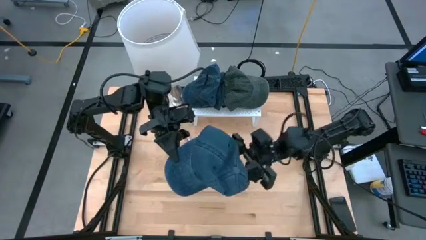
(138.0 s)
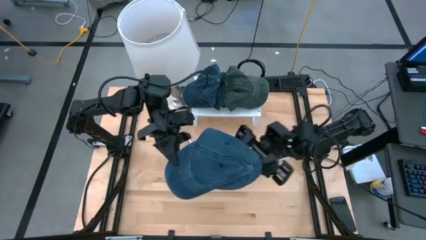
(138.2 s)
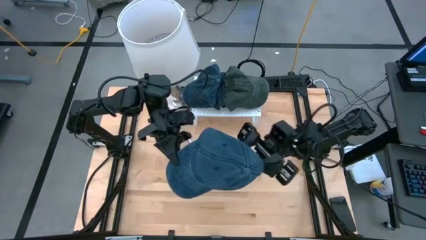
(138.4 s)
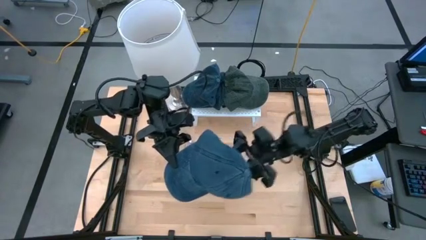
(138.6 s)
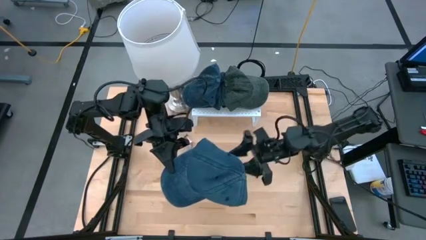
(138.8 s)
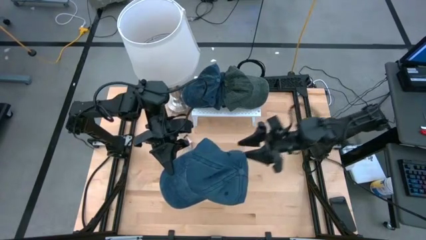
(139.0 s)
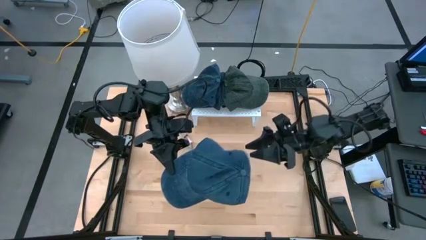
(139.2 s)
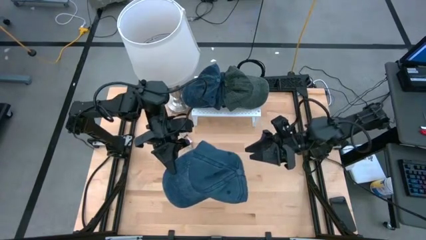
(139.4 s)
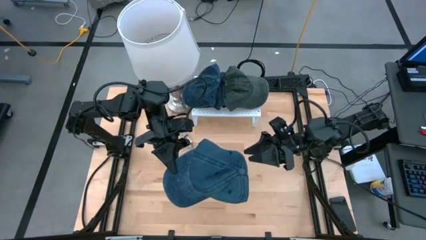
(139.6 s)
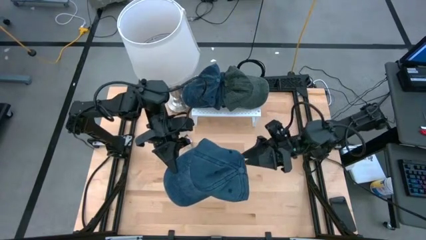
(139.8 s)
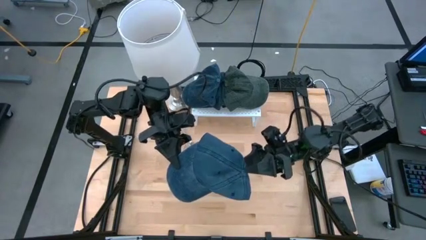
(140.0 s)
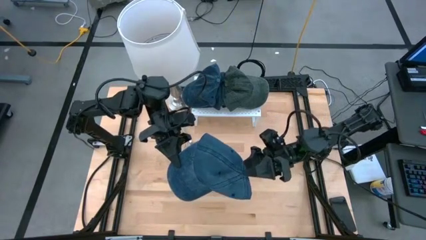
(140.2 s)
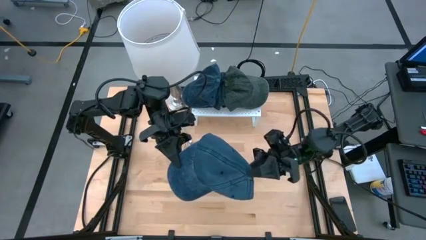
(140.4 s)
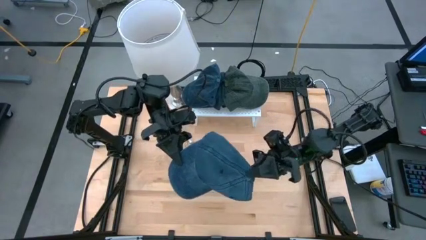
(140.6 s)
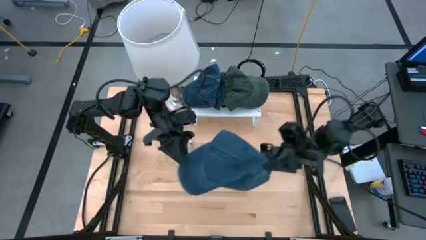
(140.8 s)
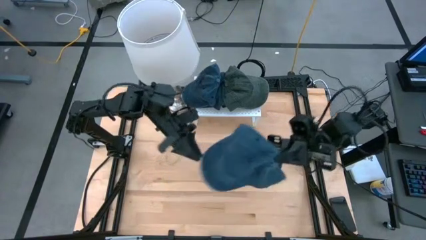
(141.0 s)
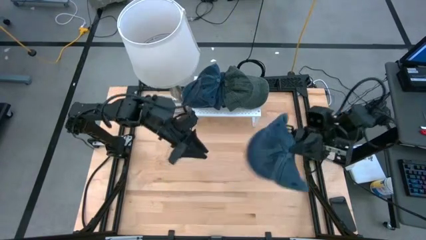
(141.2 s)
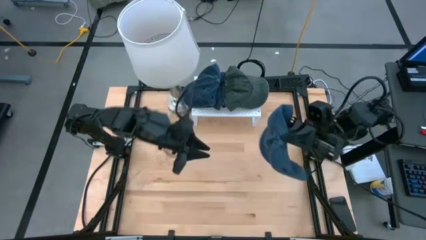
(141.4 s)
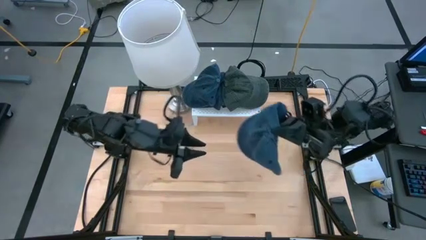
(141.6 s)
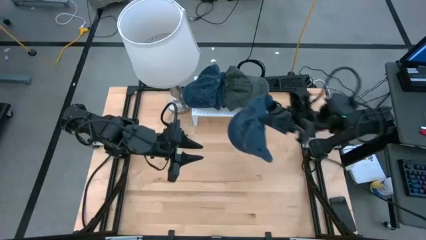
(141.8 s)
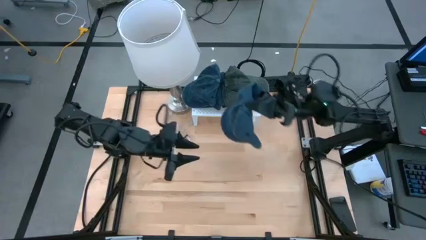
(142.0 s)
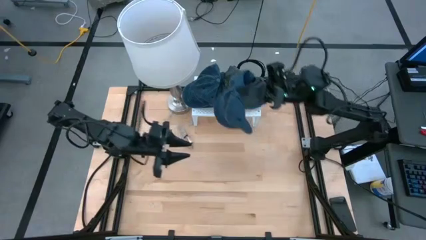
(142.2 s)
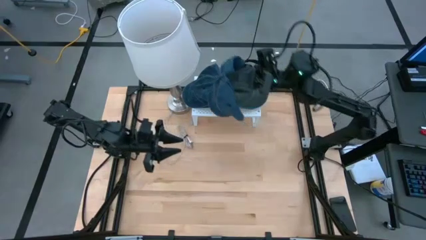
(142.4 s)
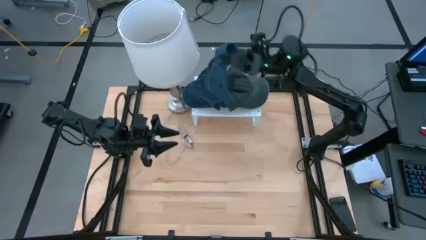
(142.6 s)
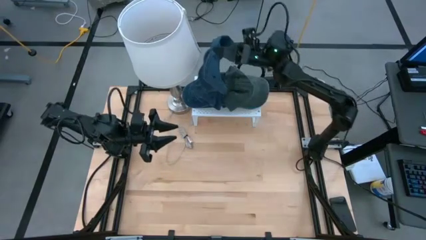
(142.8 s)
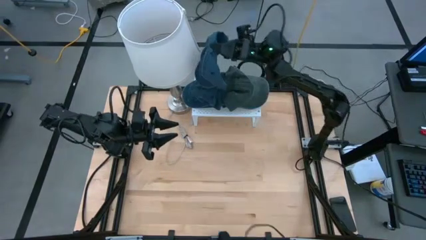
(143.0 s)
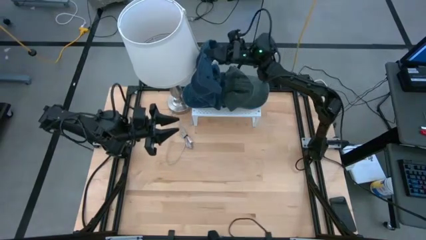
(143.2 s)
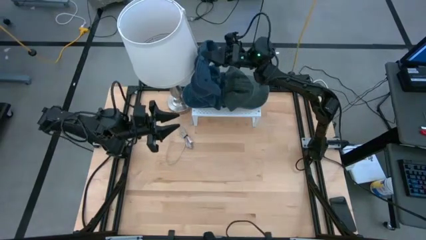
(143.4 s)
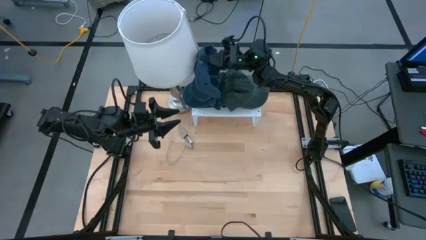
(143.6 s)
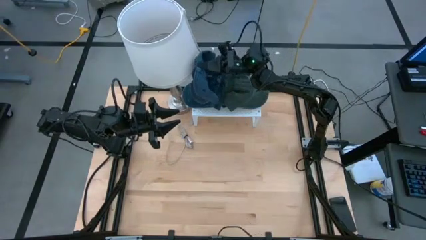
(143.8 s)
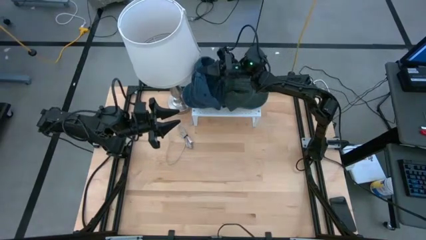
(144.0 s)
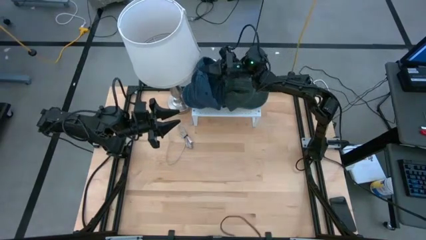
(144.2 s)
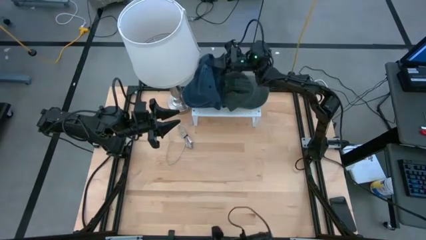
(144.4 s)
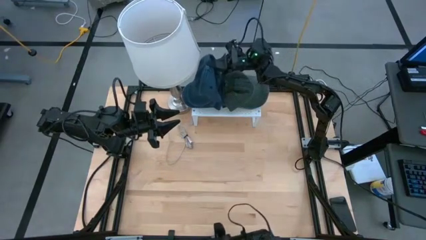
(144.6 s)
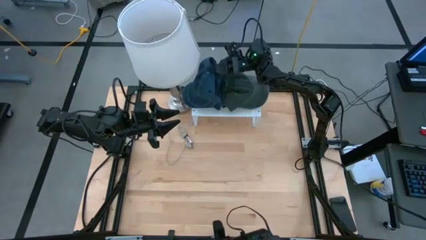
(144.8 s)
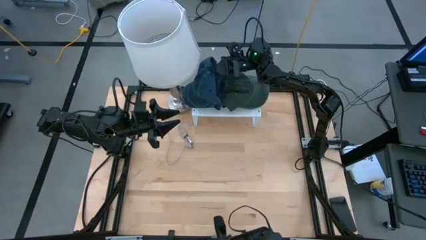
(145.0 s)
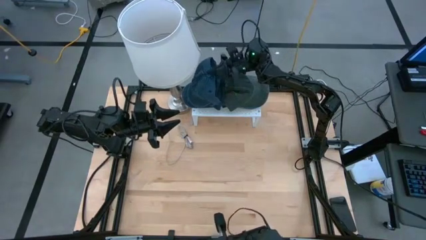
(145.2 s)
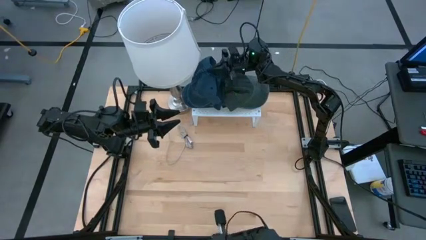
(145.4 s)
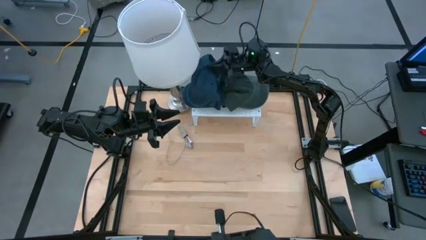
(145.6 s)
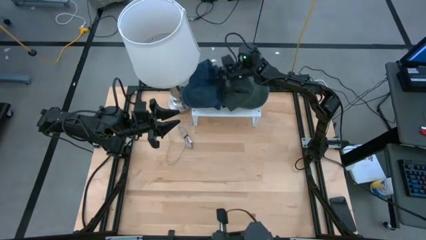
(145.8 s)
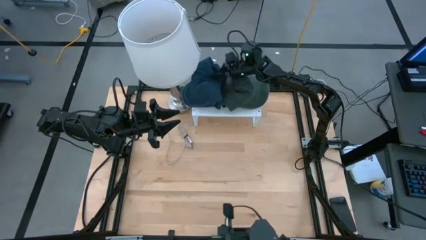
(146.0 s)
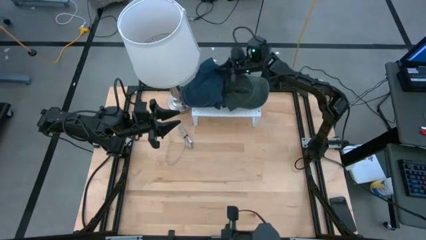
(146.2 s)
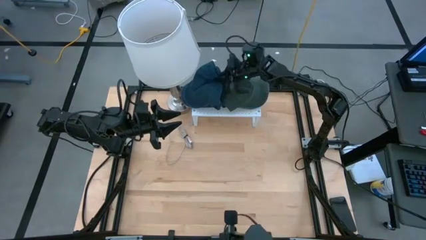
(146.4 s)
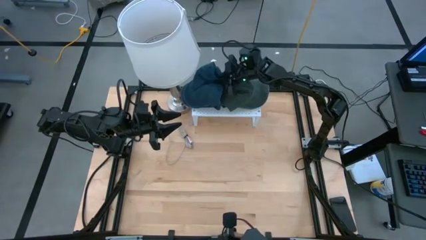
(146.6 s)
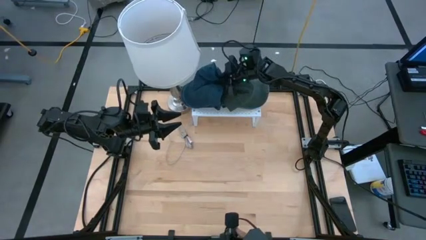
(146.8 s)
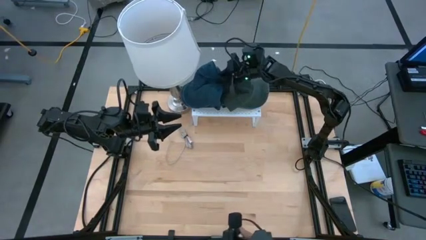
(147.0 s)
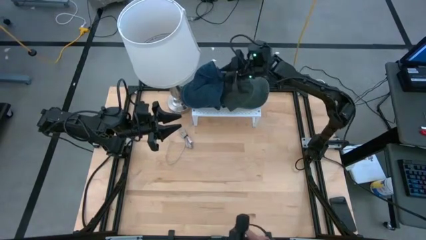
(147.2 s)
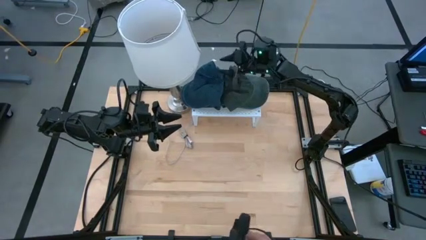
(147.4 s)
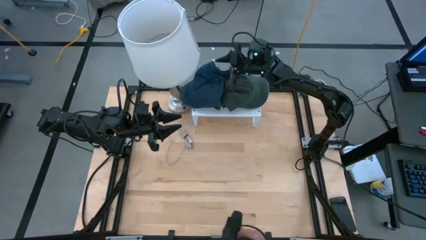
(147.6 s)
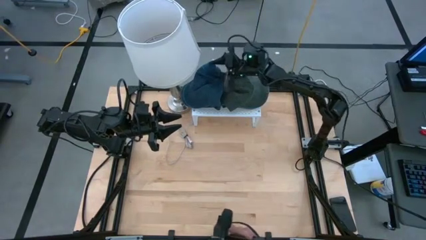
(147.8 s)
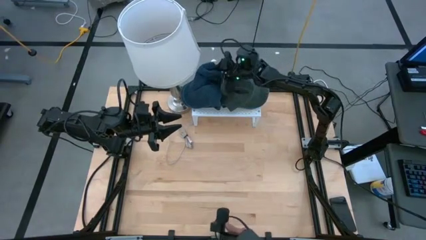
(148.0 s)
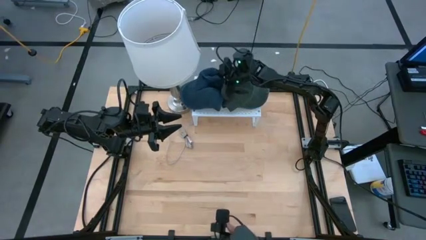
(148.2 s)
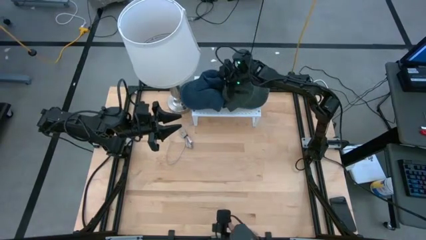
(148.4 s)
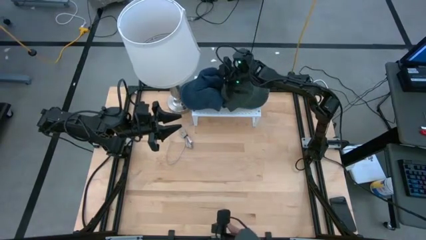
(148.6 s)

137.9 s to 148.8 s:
Task: Pick & Place hat
Stack the blue cap on the blue caps on the shelf

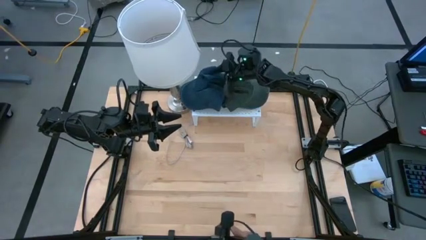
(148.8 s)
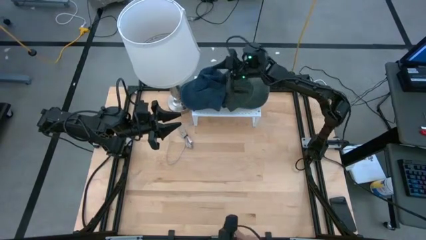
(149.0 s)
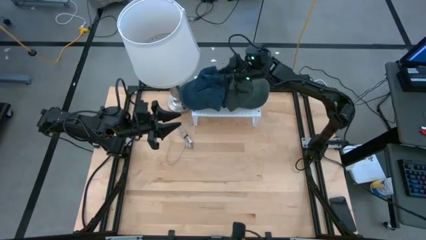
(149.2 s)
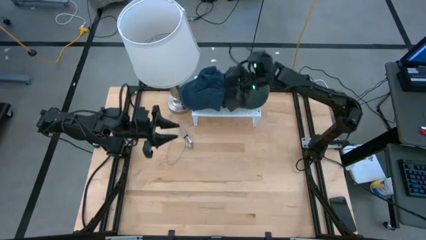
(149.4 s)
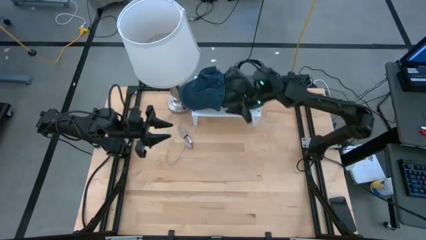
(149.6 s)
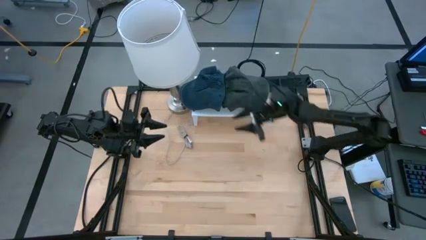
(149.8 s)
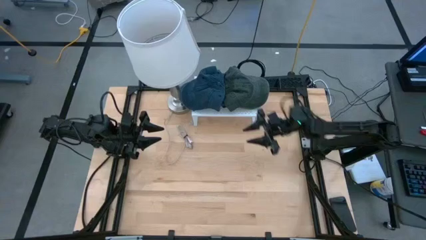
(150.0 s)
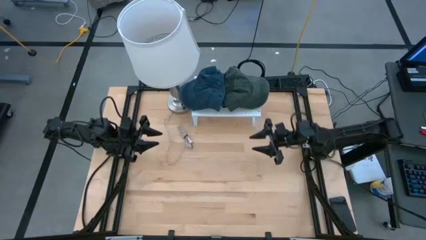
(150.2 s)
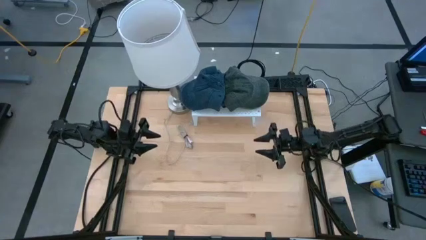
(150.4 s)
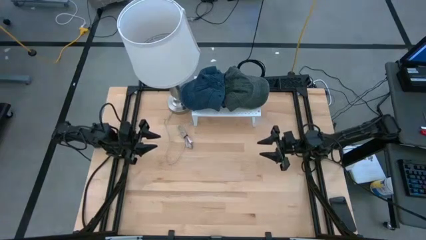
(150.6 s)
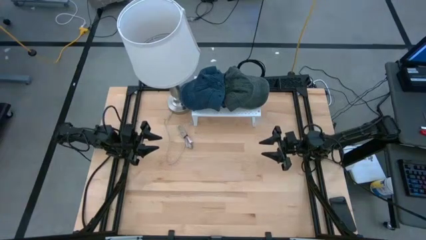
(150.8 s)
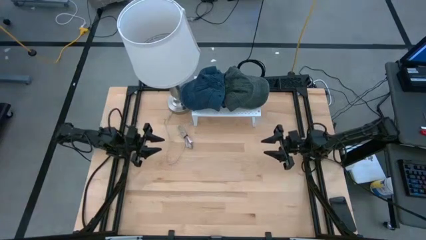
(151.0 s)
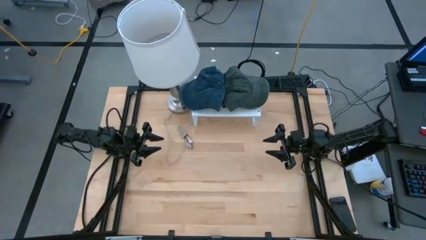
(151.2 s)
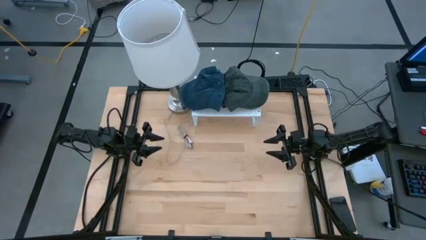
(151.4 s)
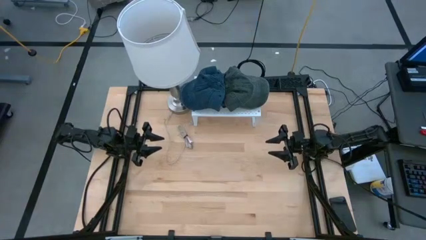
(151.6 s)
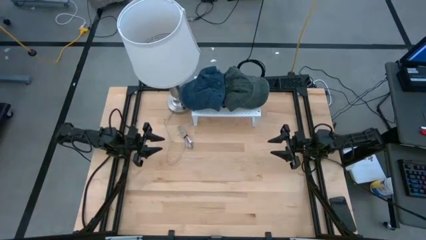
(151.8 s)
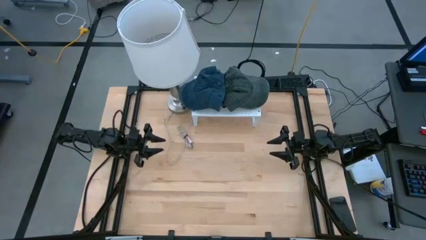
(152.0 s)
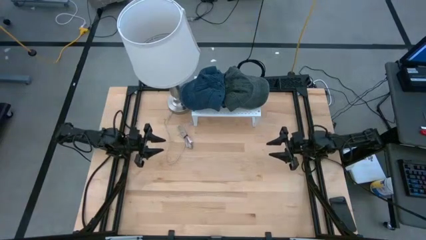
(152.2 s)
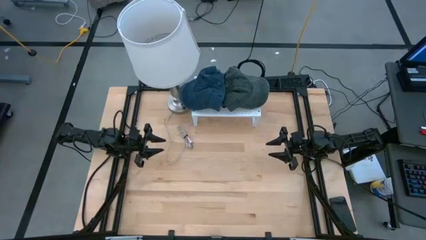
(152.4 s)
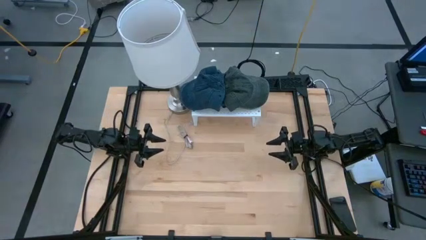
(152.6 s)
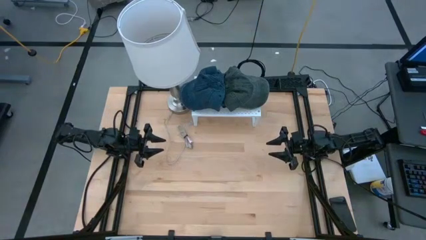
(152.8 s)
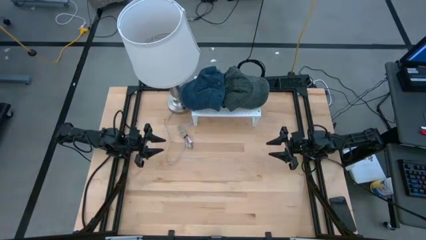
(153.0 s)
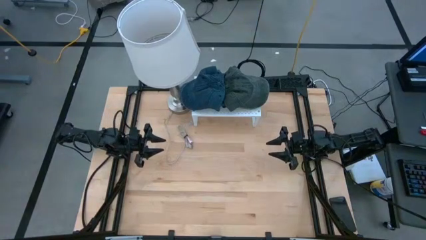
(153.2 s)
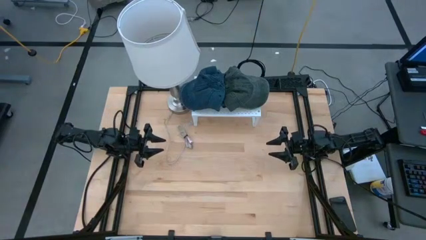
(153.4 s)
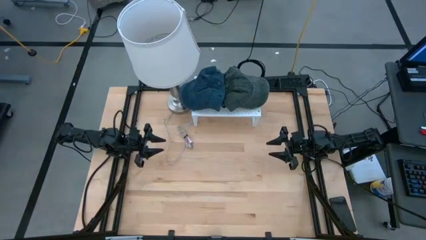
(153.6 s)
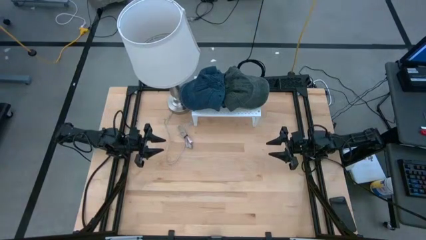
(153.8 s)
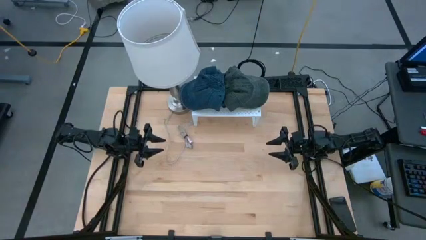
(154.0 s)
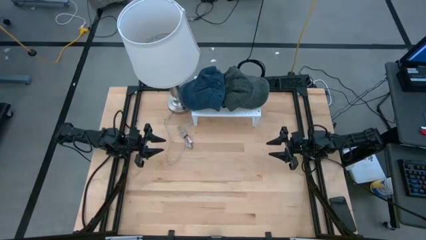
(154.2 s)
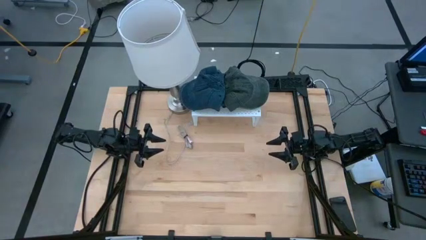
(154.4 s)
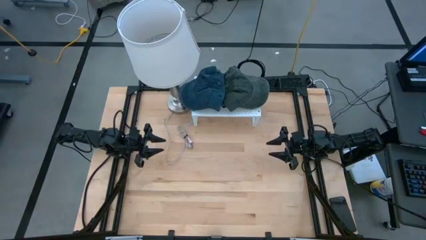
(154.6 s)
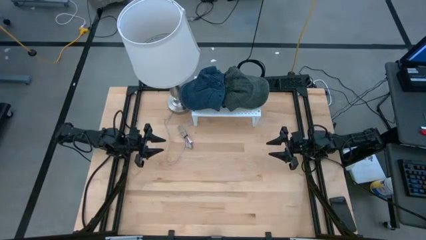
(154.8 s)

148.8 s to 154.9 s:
Return to Home Position
